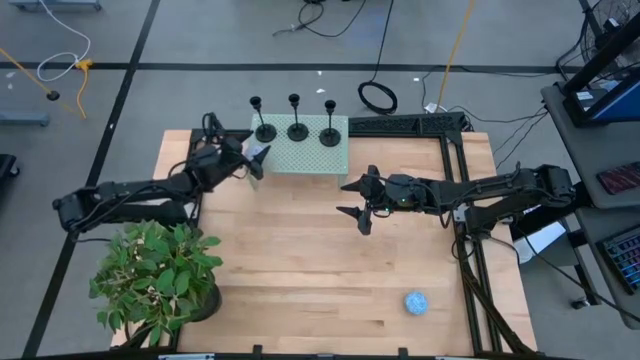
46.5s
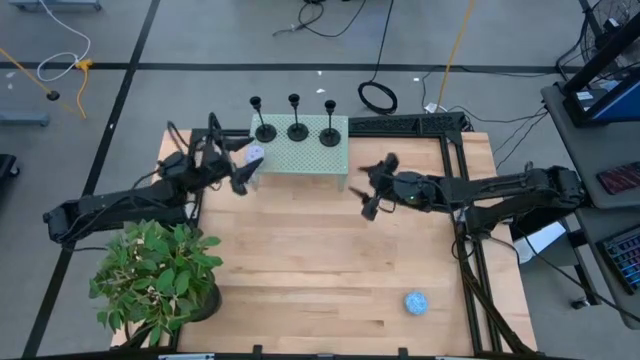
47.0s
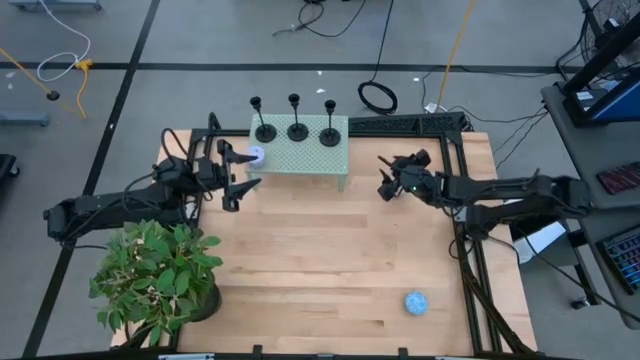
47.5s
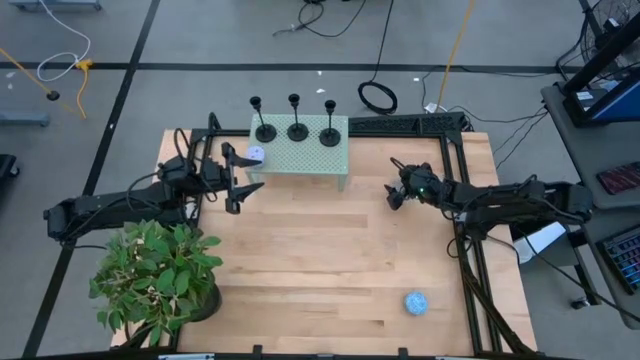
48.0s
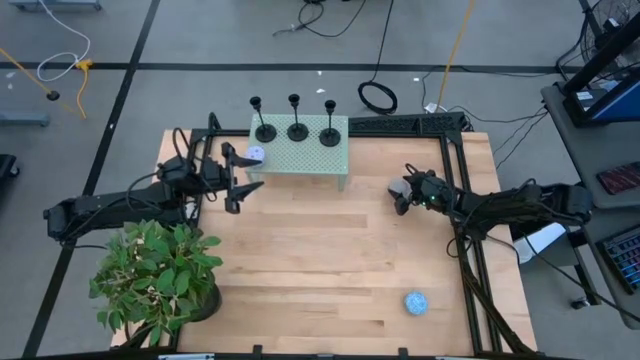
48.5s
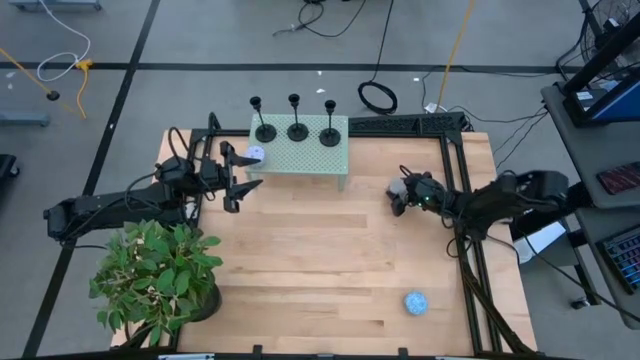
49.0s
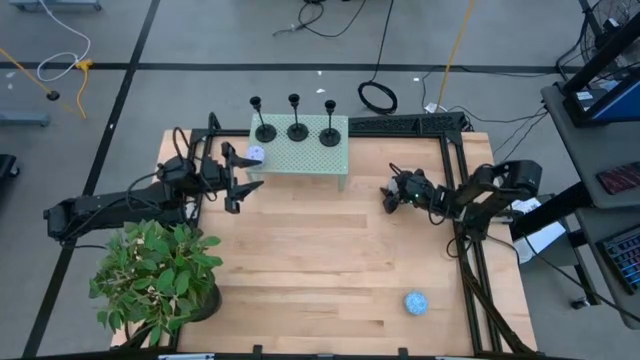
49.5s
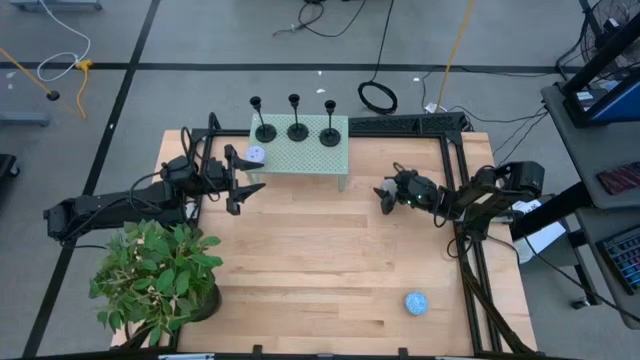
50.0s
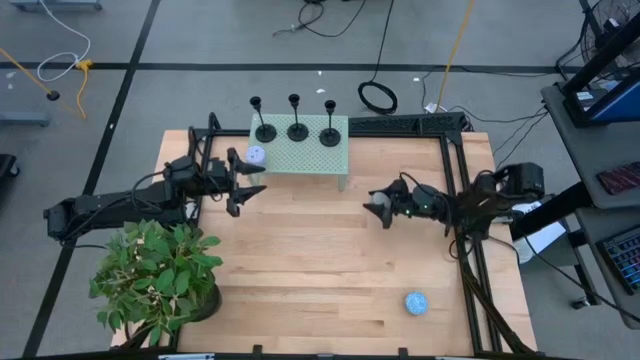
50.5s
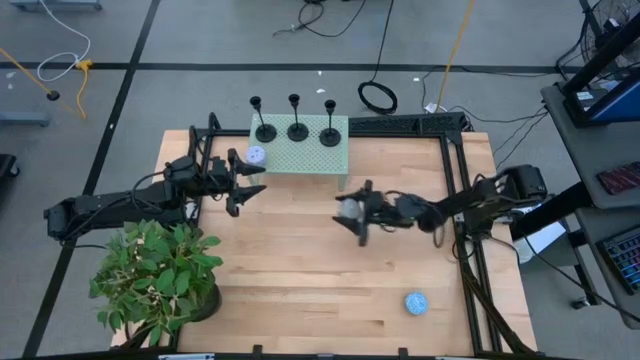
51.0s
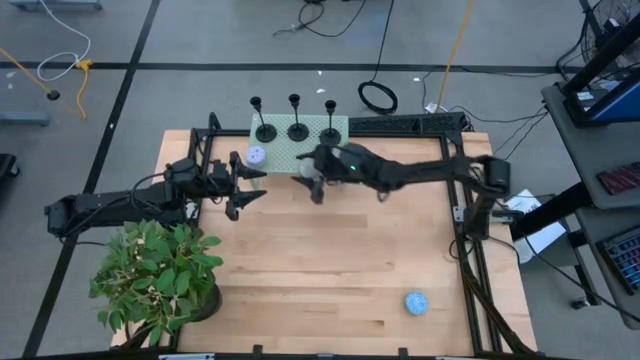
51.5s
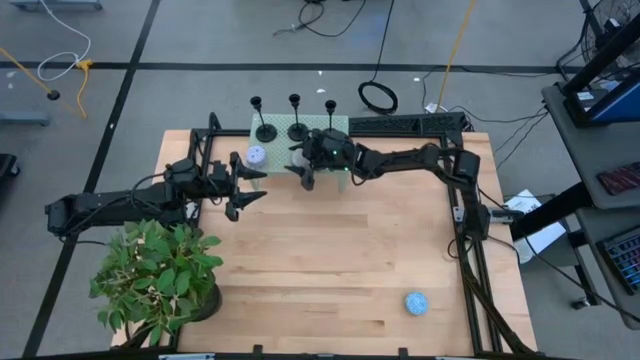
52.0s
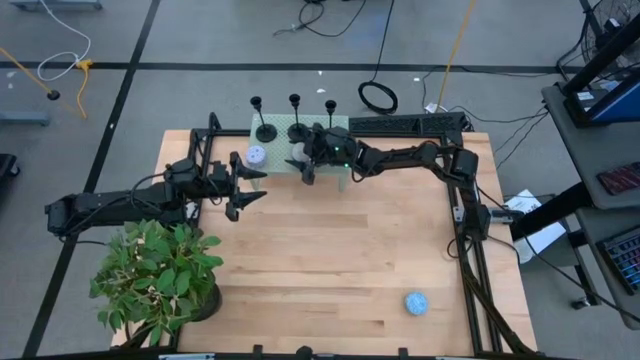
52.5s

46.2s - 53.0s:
Task: Pick & Place candle stick holders
Put the yellow patterned scented candle on the shelf

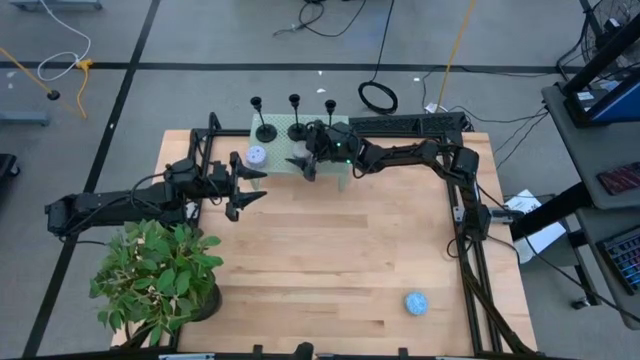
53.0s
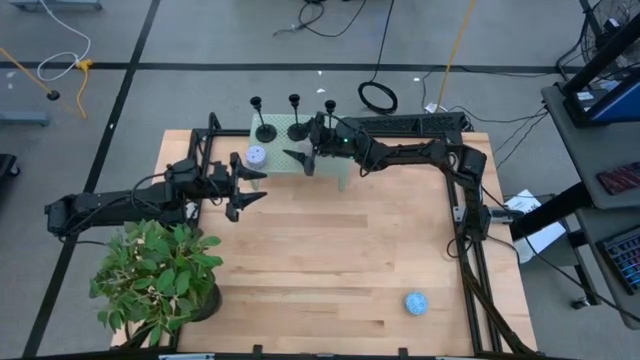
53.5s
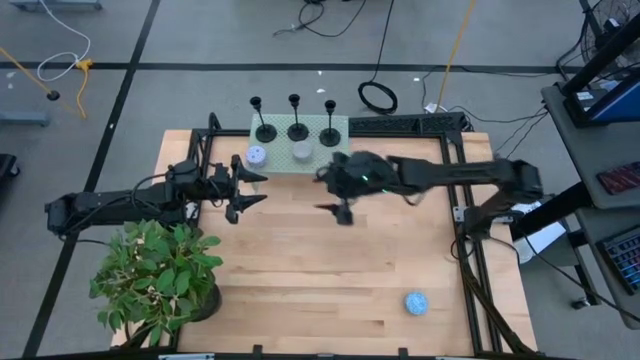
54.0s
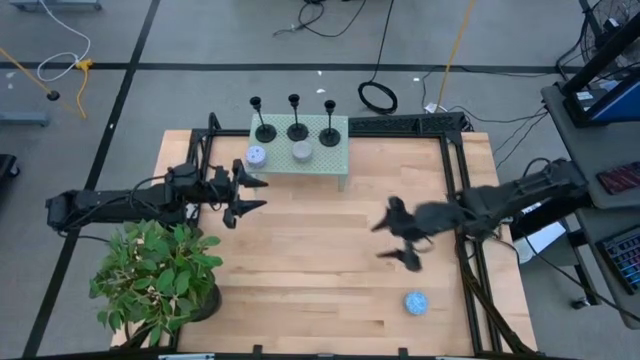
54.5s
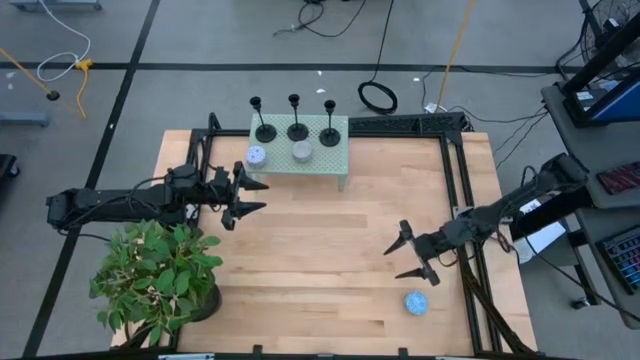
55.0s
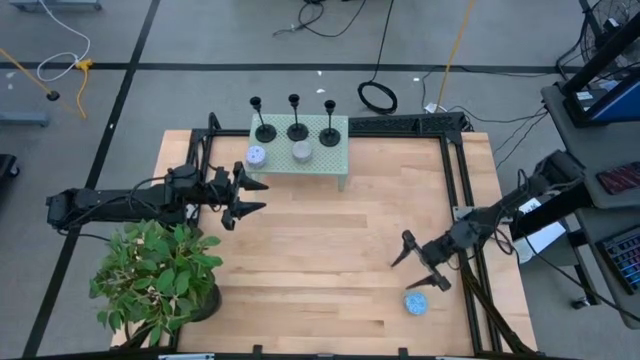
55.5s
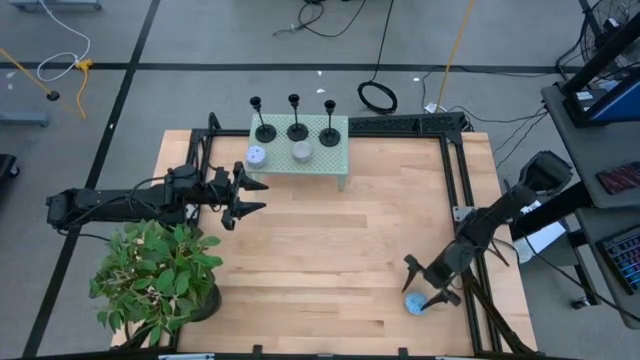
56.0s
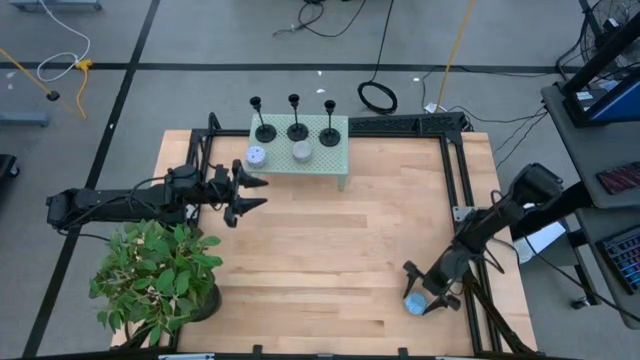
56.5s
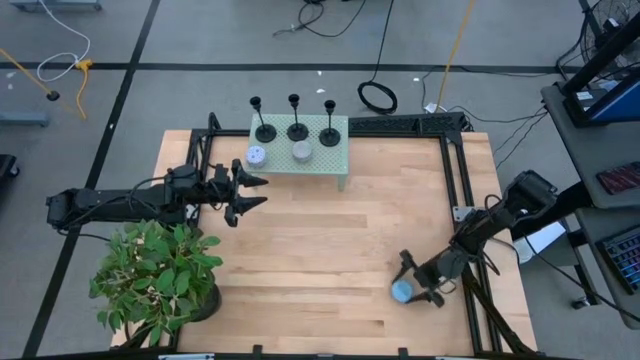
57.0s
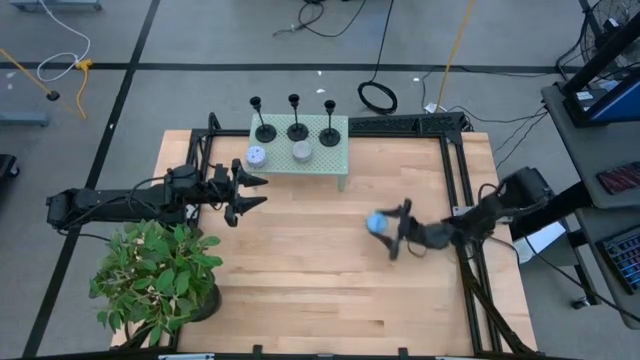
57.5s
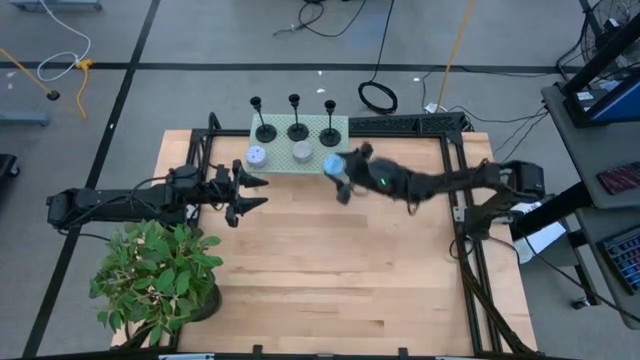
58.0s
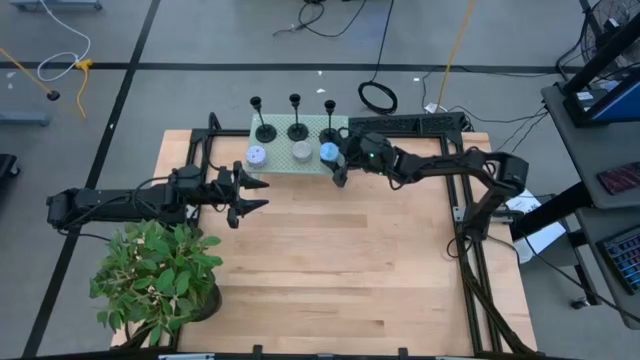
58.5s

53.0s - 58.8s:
Put the blue patterned scented candle on the shelf

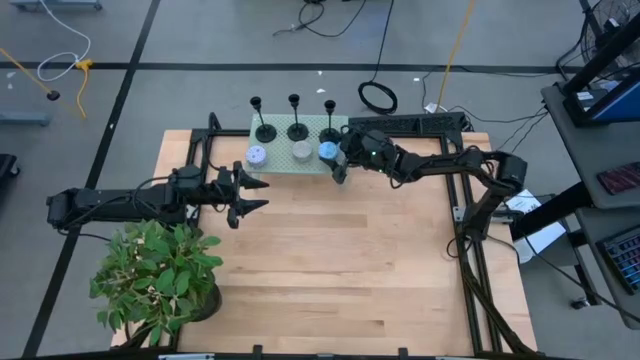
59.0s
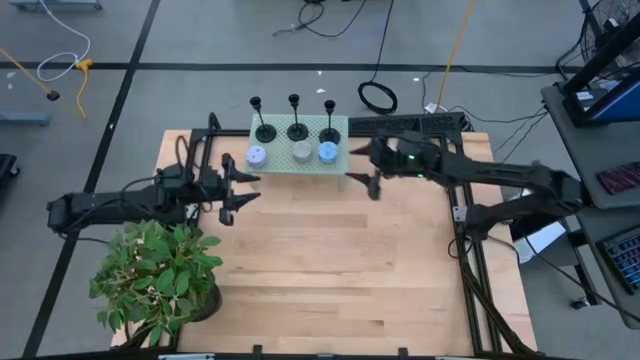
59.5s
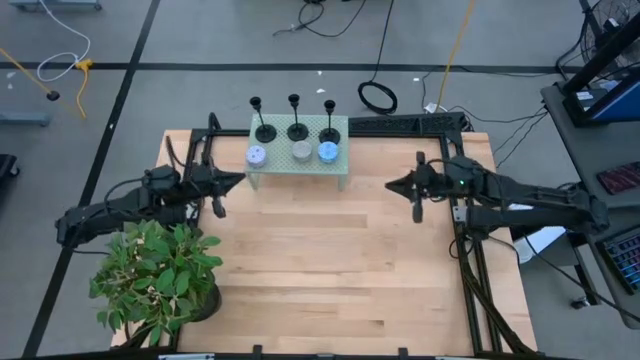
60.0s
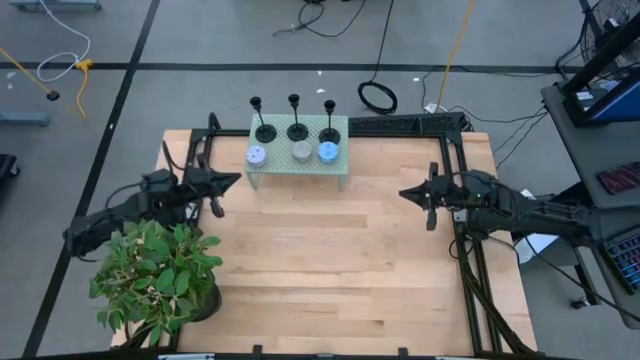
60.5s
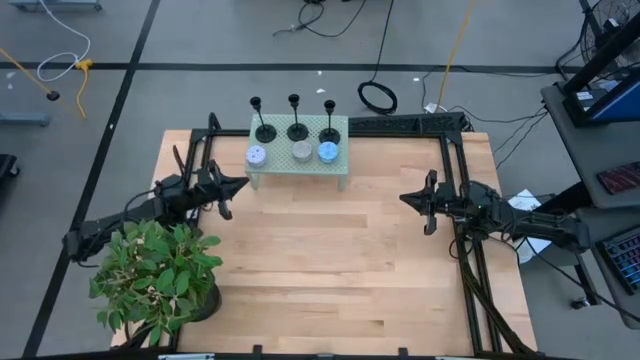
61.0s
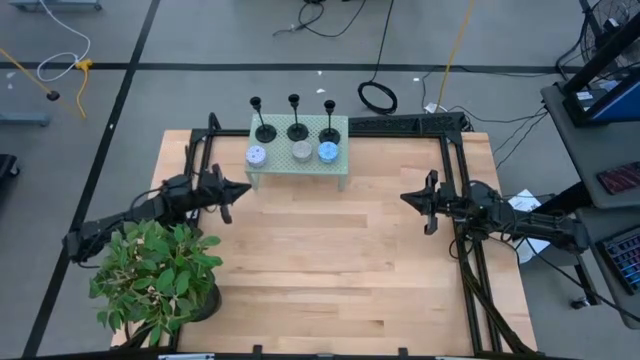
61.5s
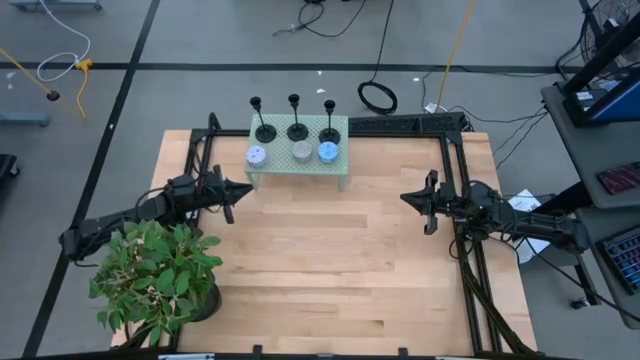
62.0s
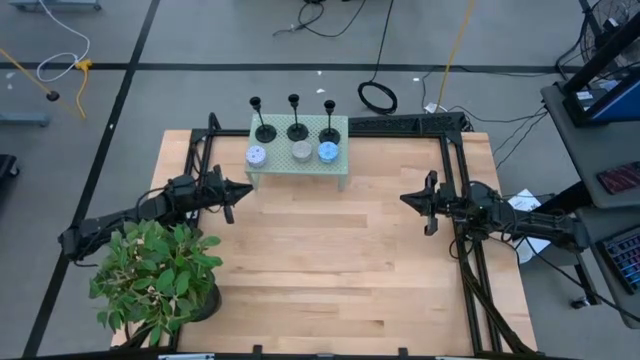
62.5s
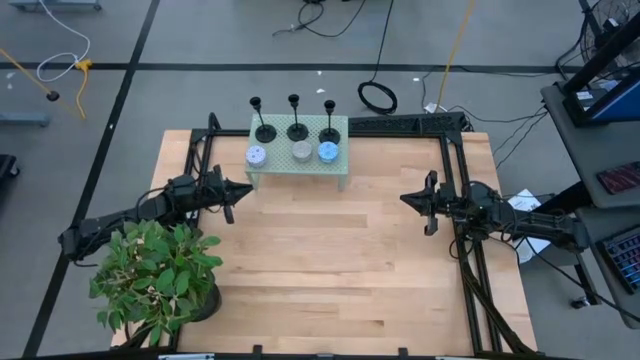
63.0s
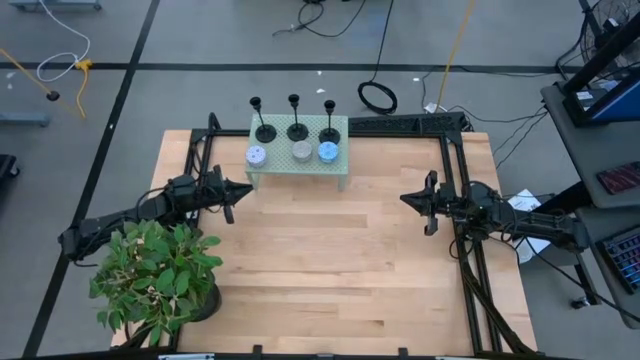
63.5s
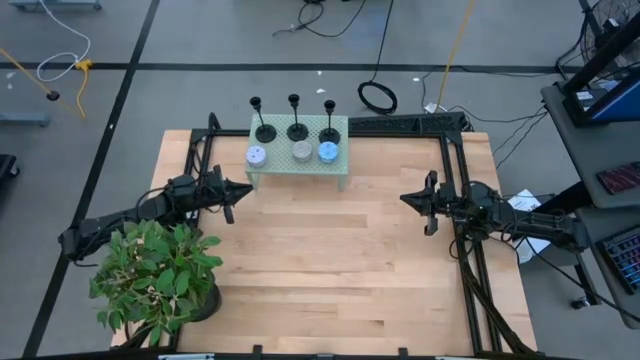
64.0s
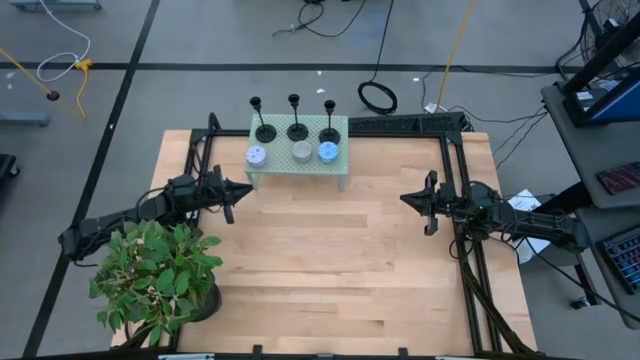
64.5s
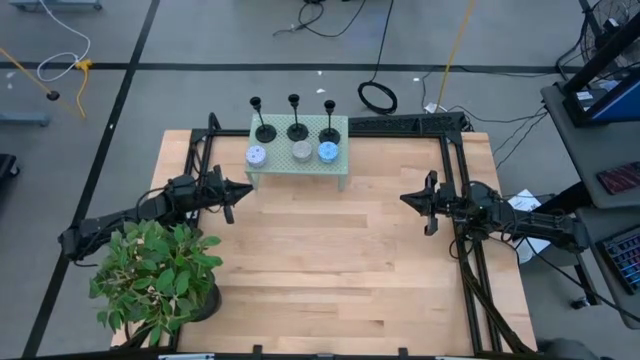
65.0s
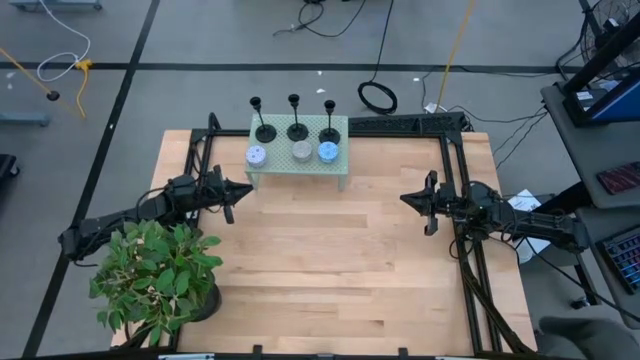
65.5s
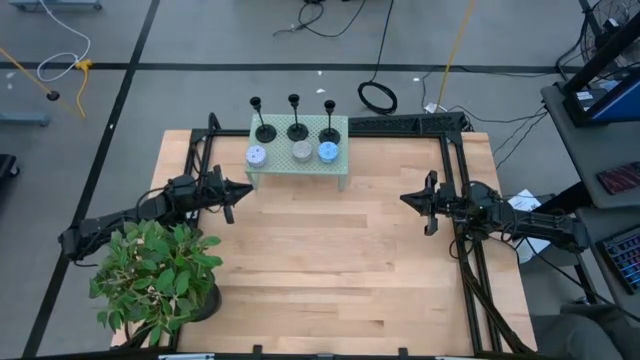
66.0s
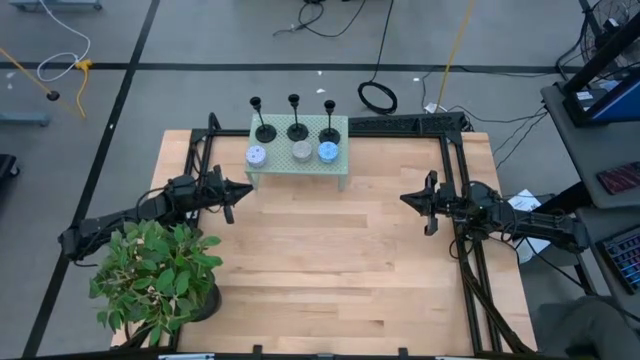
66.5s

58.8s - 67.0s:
Return to Home Position

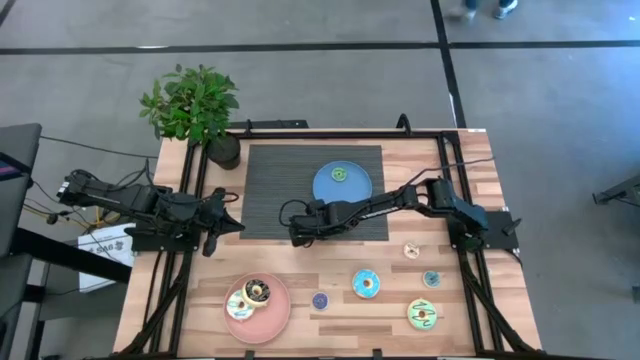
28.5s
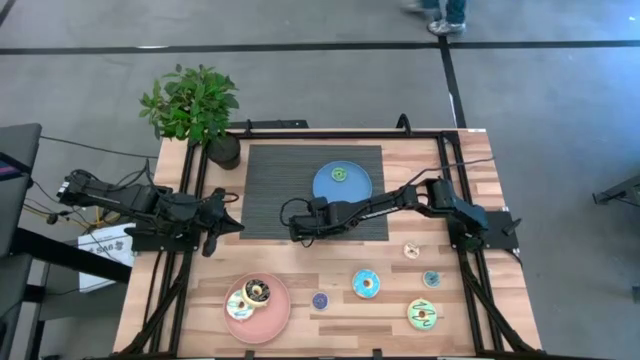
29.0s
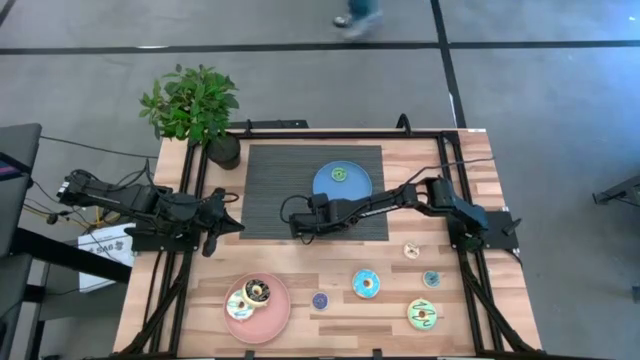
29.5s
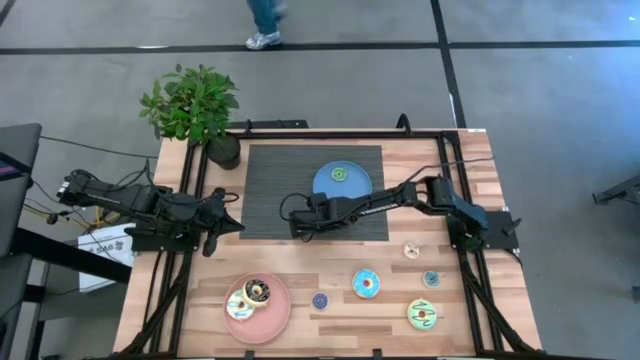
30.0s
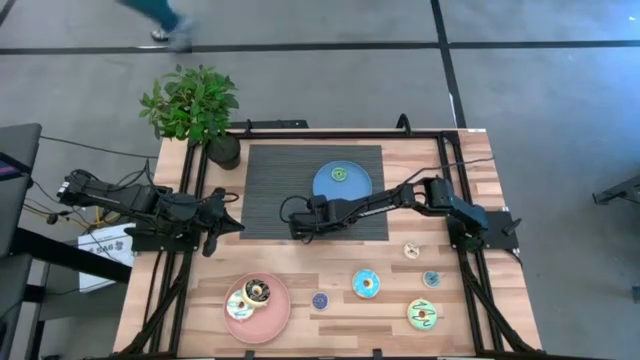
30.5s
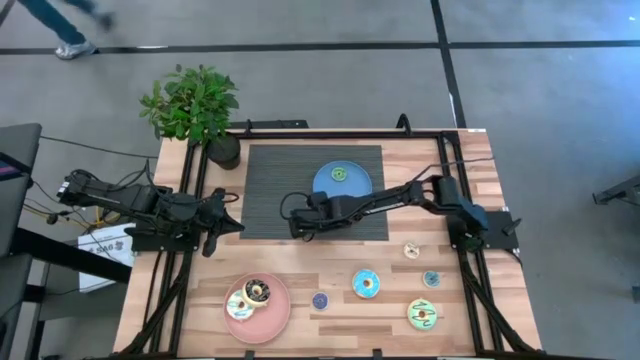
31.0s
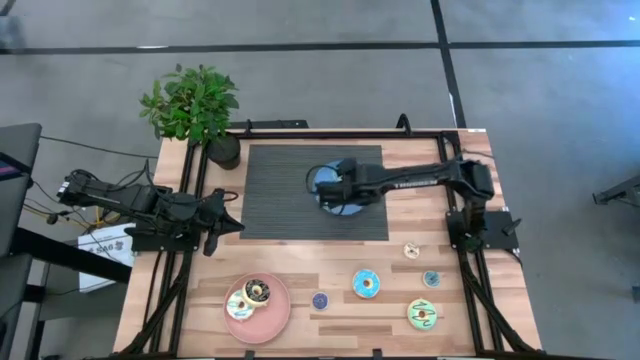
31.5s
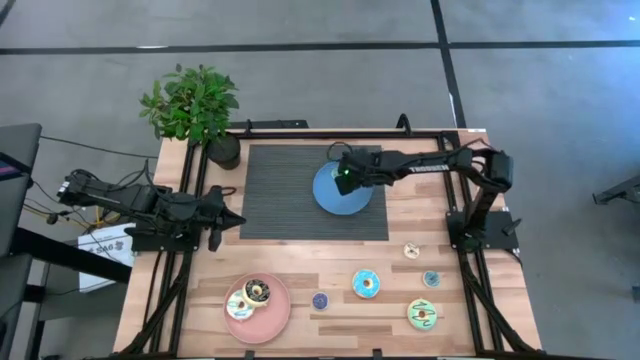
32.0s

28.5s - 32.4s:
Task: Pick & Place donuts
Put the top small purple donut on the blue plate
